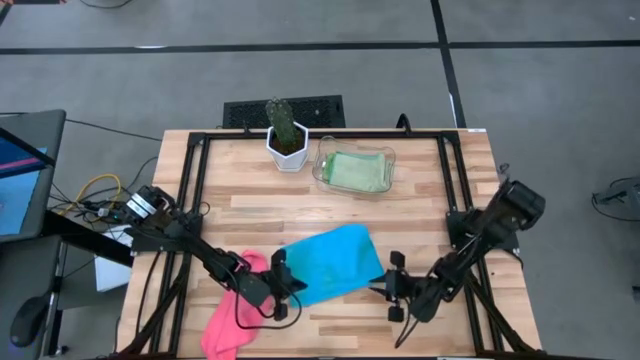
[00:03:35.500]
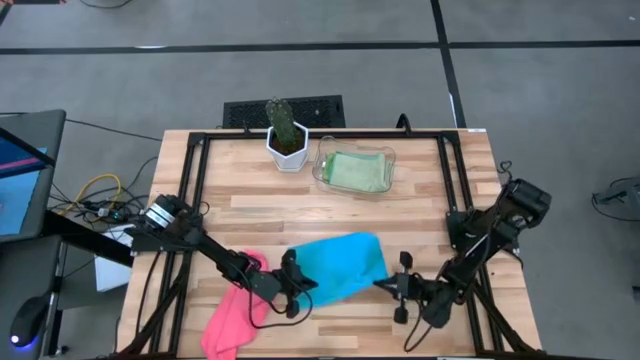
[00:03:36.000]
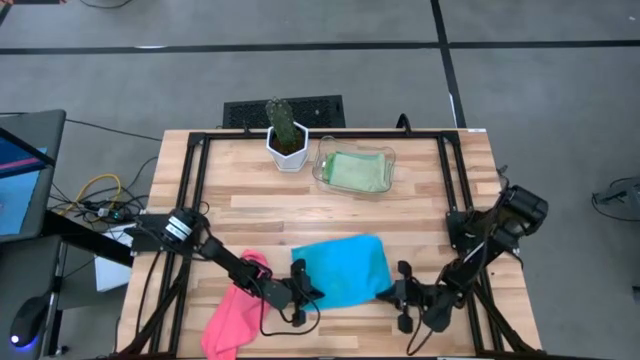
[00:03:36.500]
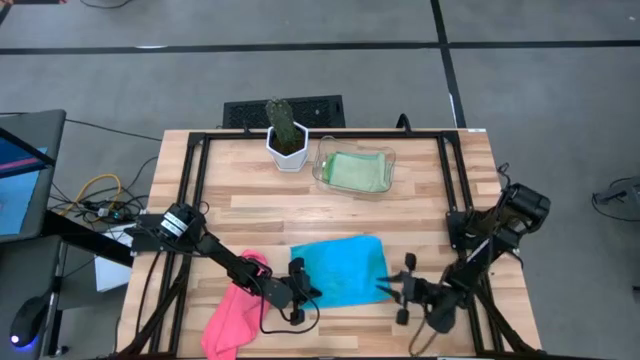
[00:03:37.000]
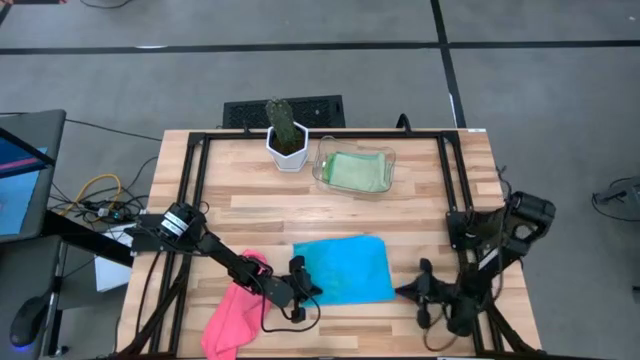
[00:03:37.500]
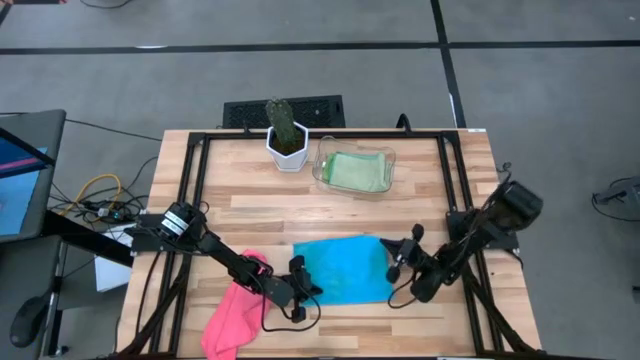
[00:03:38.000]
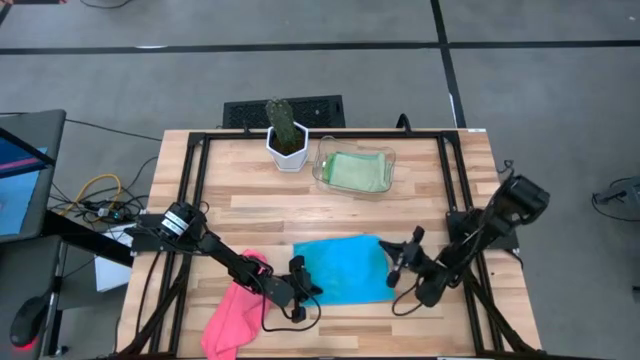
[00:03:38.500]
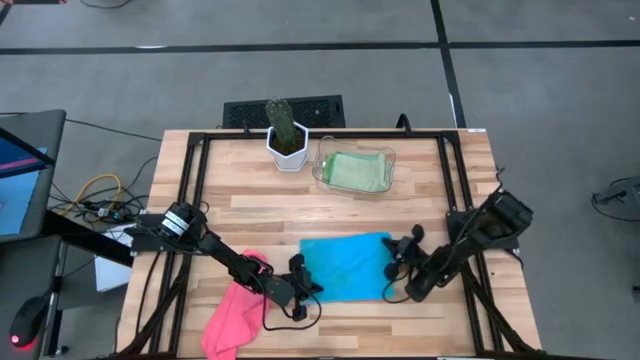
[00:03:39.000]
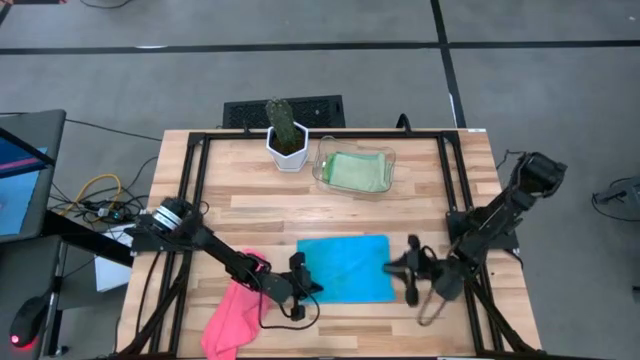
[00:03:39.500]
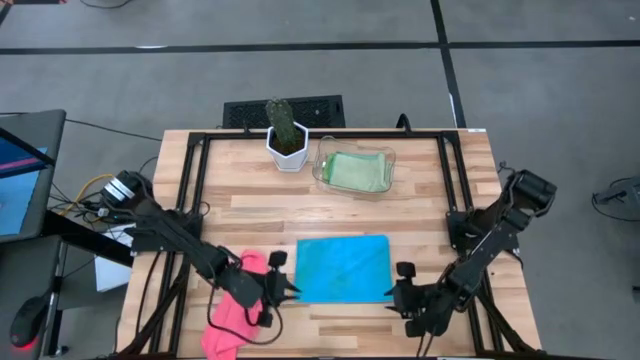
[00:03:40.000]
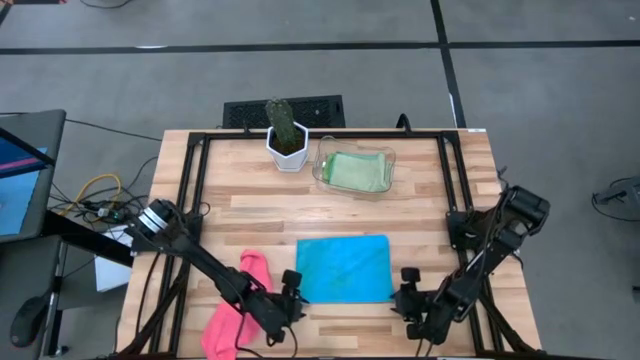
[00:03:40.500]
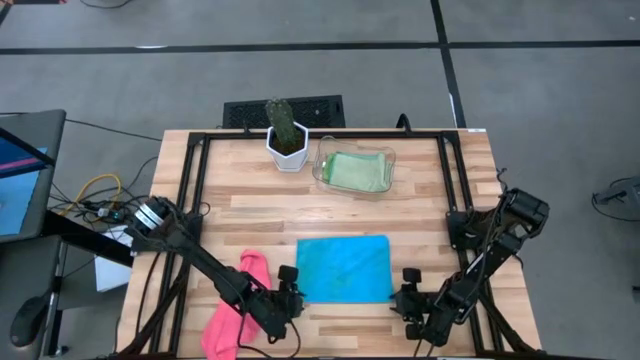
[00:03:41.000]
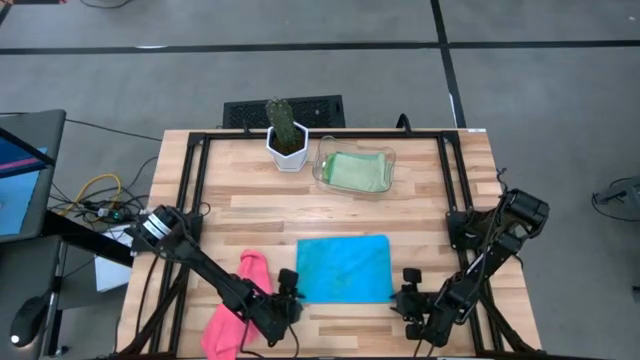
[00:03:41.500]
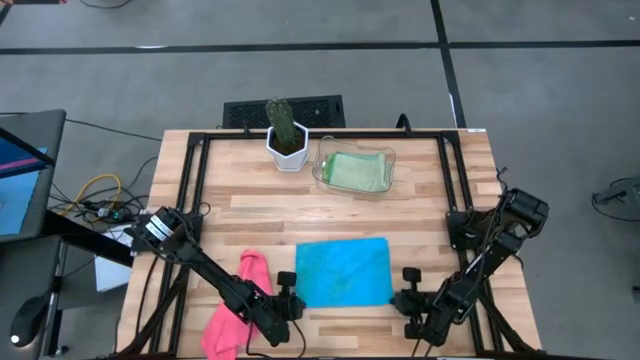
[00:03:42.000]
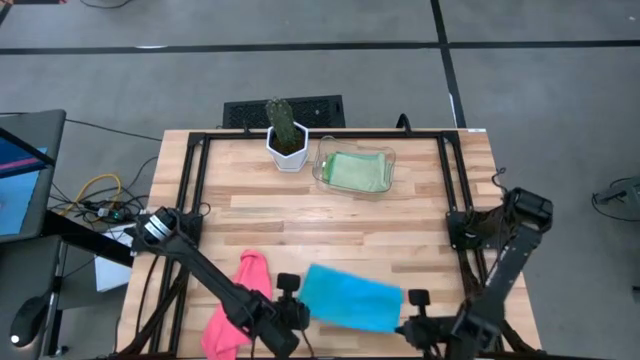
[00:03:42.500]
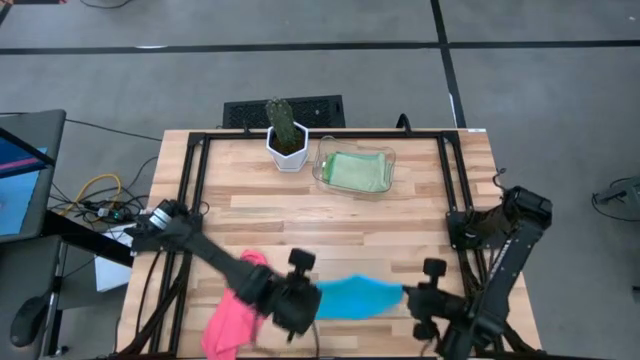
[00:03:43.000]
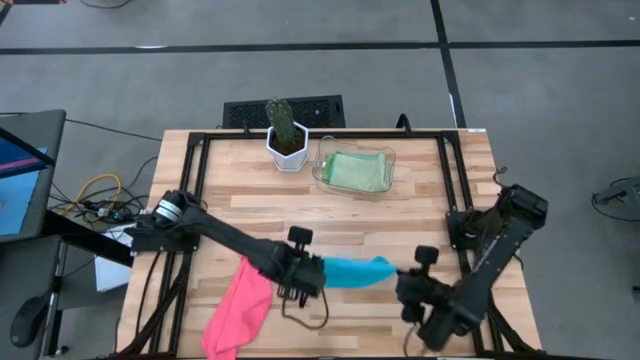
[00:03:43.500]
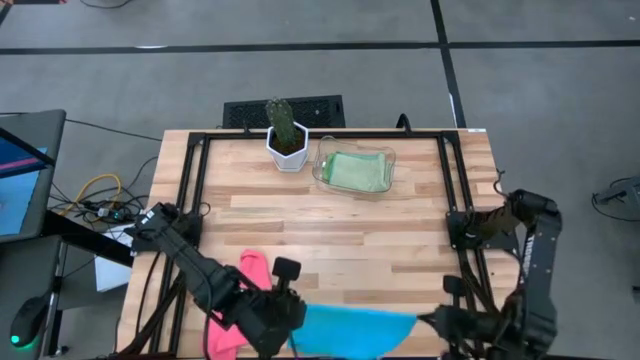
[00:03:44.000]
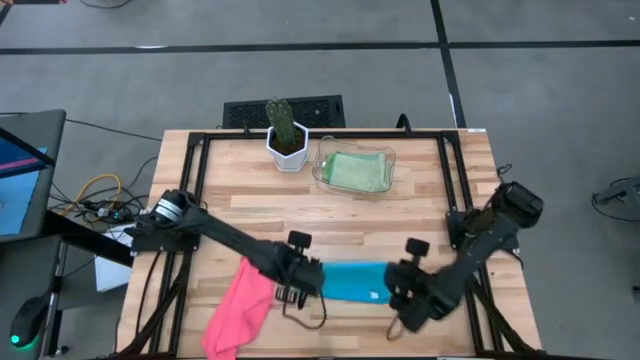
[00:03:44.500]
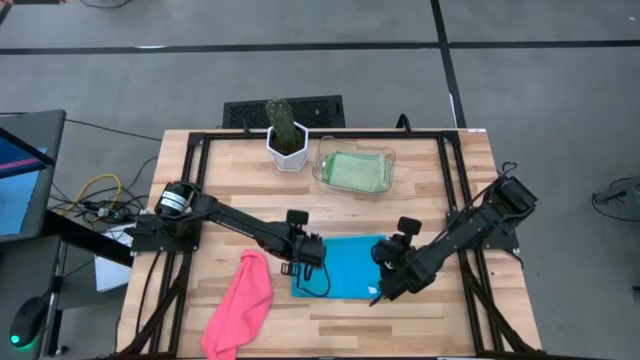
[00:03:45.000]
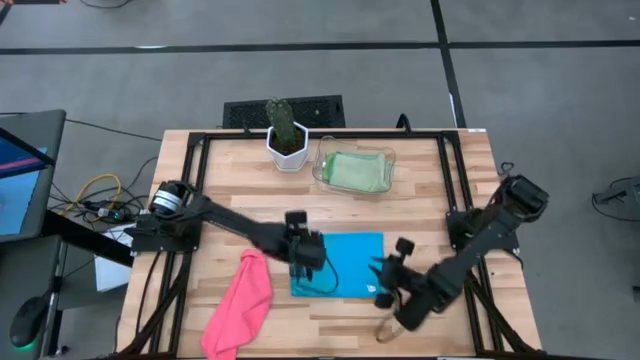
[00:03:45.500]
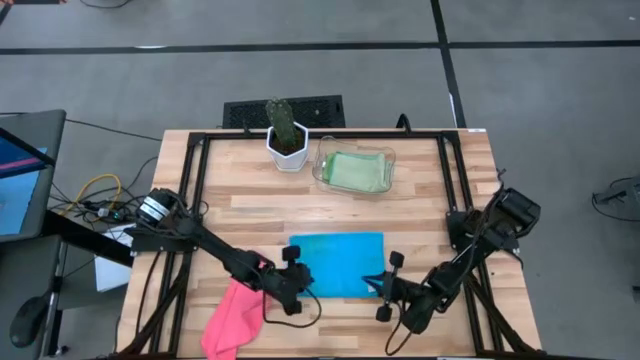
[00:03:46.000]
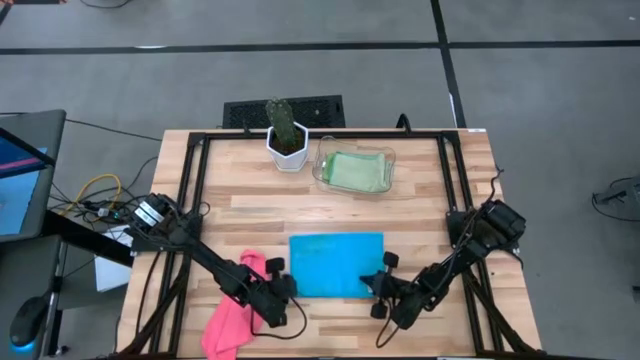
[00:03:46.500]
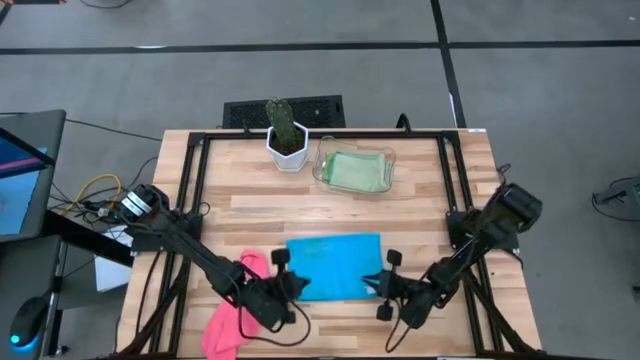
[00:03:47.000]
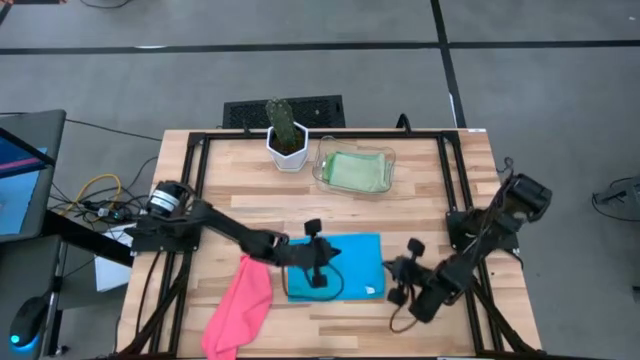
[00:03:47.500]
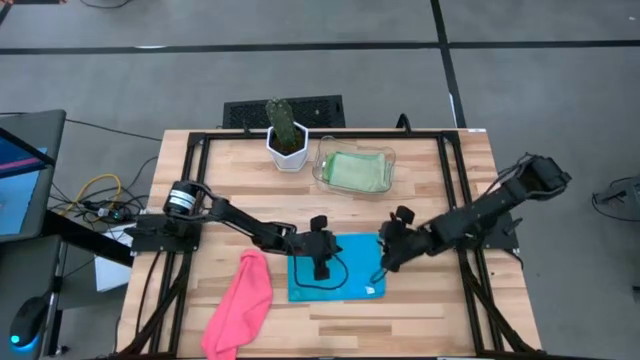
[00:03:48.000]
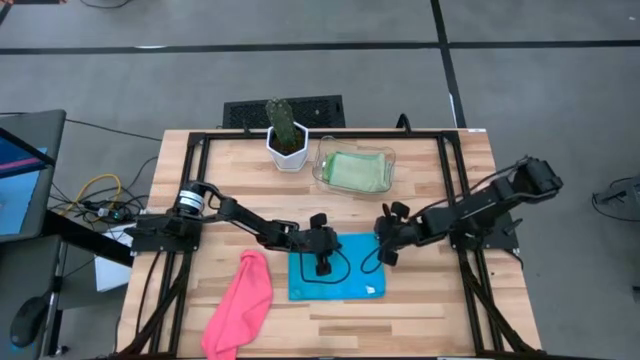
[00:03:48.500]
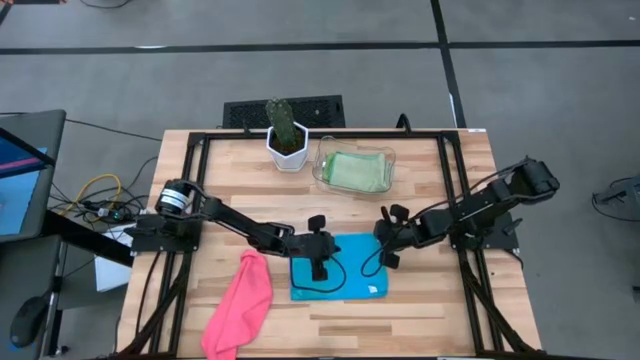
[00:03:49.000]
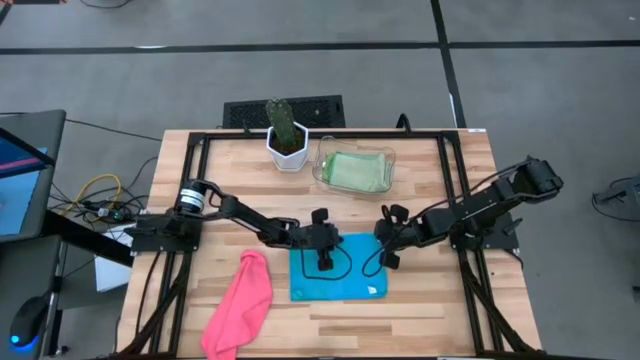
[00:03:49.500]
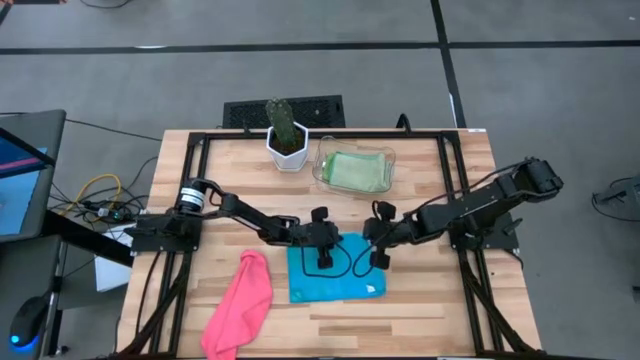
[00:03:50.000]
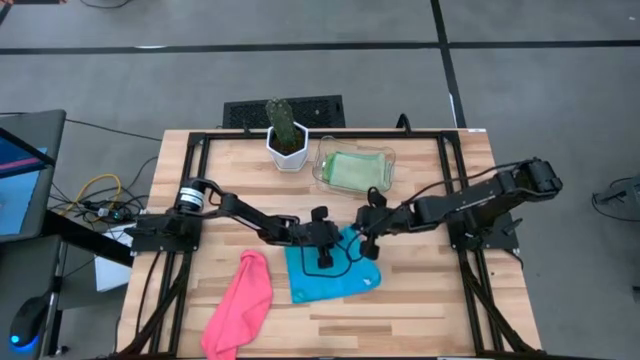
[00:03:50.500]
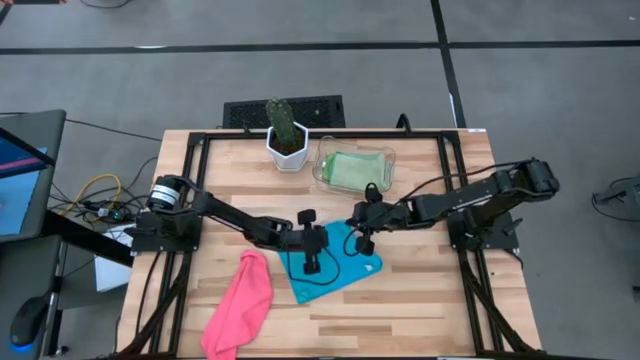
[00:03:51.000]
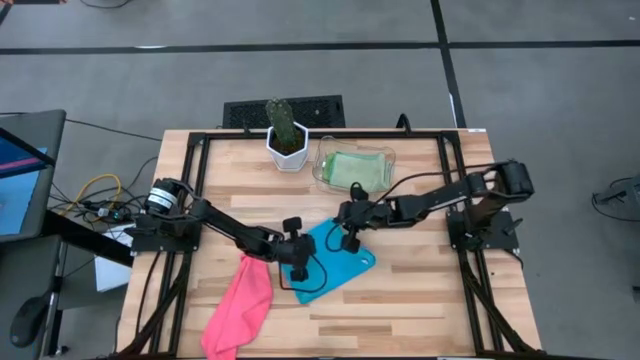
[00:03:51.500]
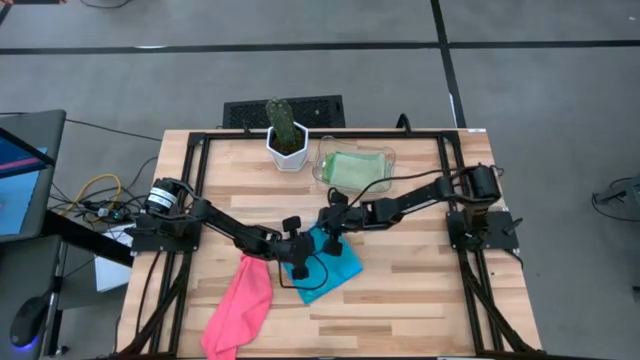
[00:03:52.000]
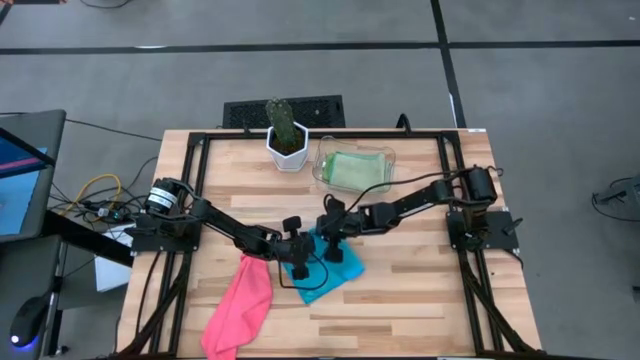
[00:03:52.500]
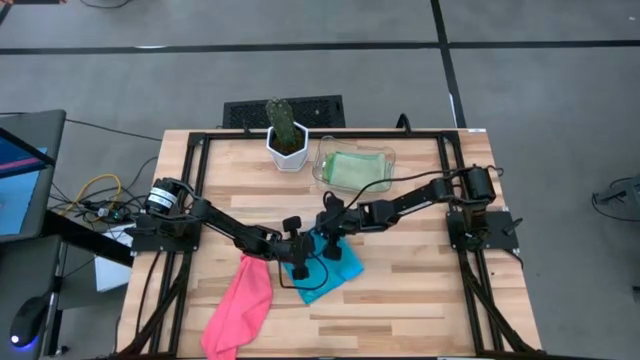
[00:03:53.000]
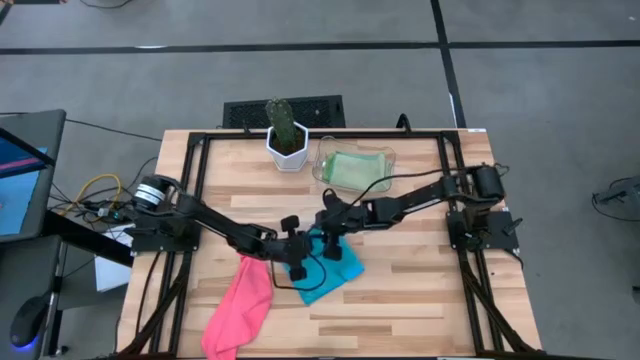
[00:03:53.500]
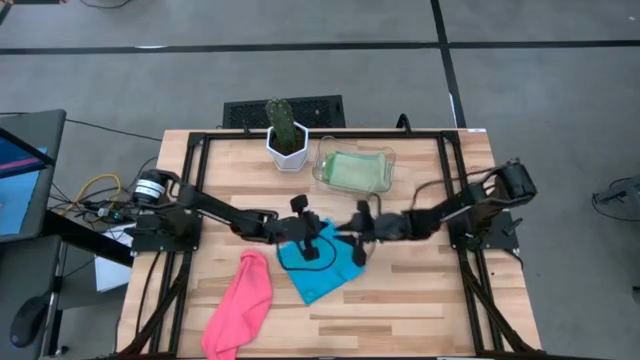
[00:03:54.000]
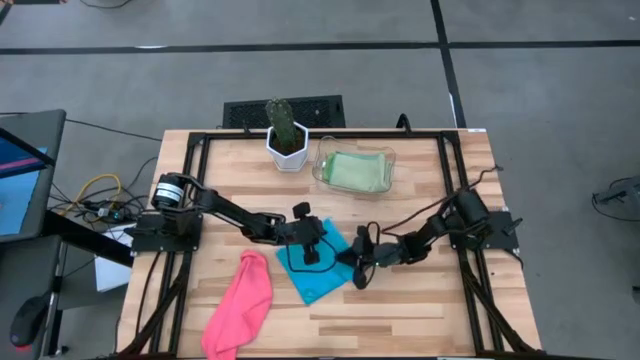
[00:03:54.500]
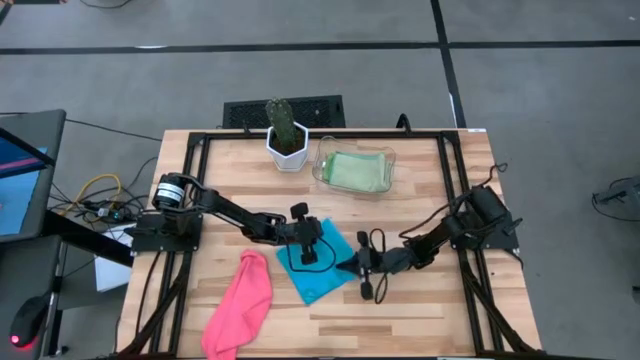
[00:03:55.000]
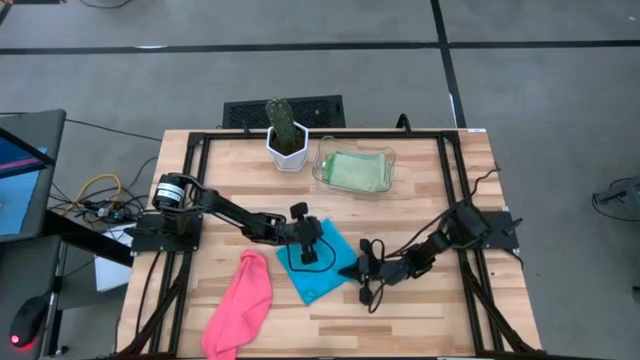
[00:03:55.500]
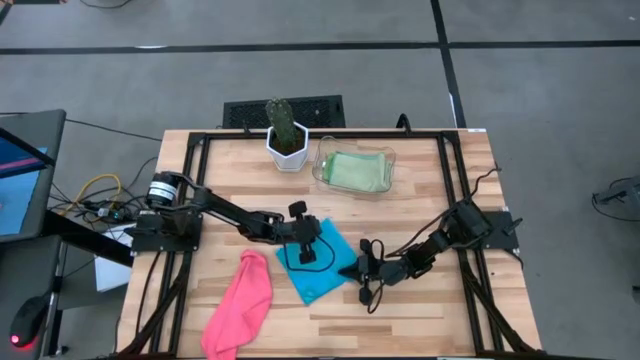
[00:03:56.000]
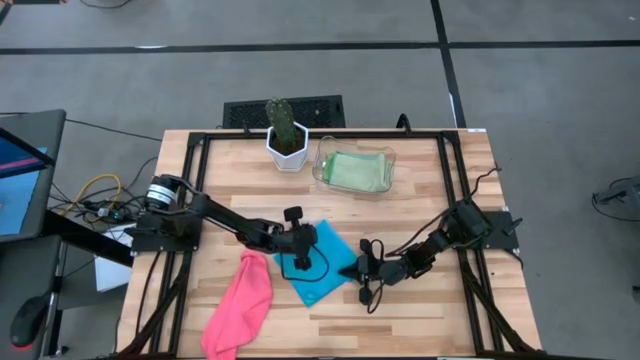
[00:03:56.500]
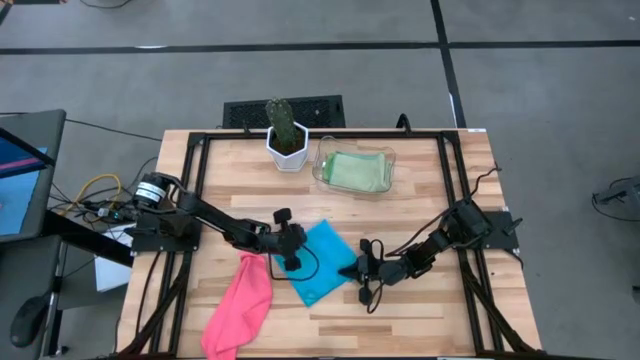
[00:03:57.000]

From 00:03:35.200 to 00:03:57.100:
Task: Fold microfiber towels
Fold the blue towel on the table

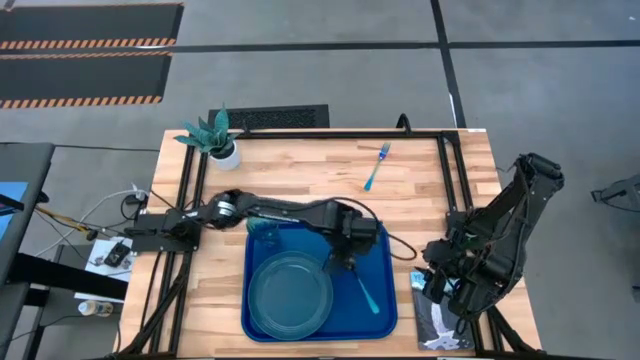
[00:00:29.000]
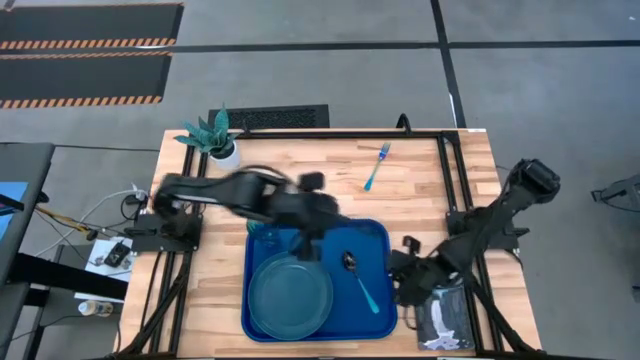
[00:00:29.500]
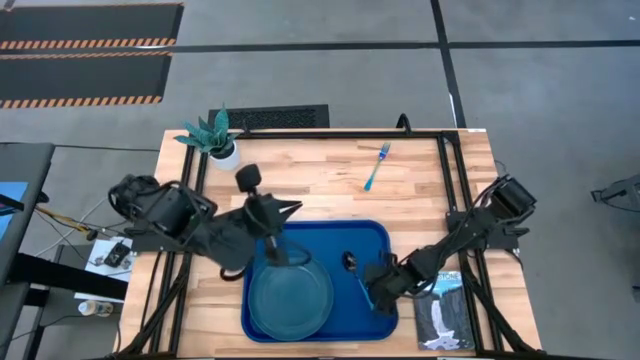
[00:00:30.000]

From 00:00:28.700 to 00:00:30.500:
Task: Pick and place plate/cup/fork/spoon on tray
Adjust the blue serving tray
